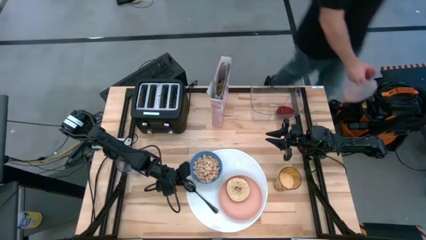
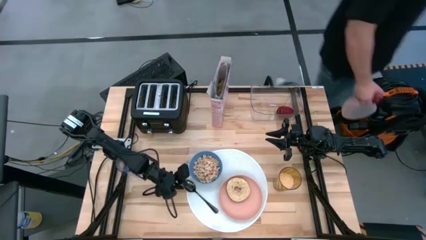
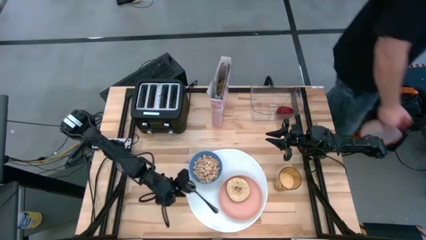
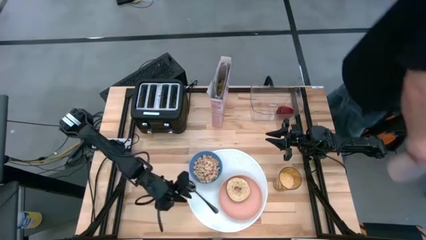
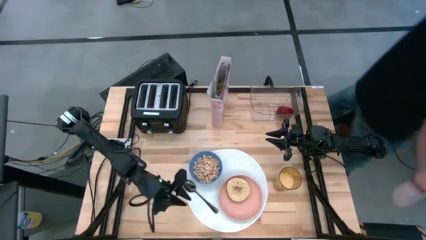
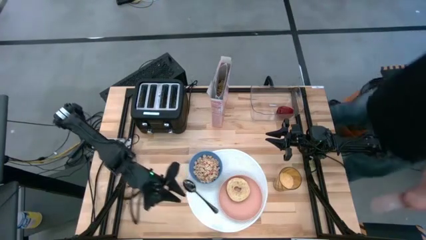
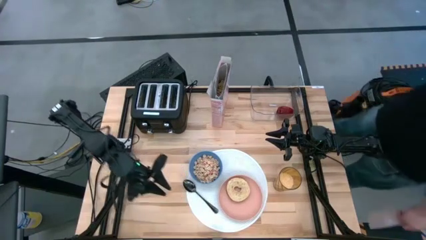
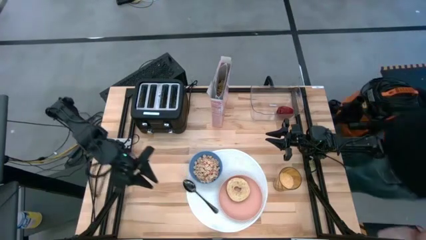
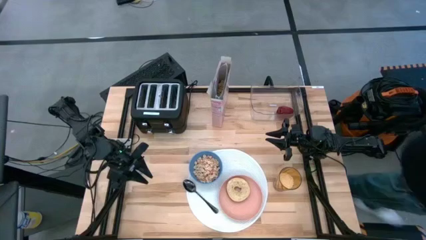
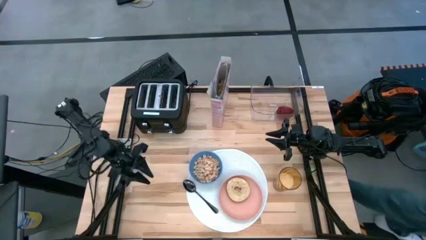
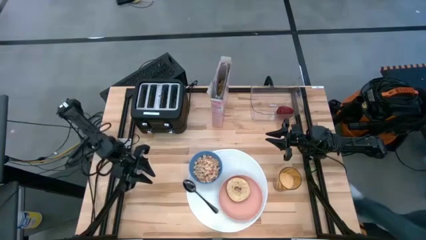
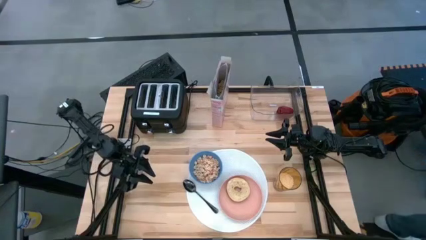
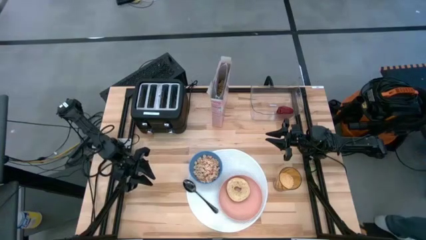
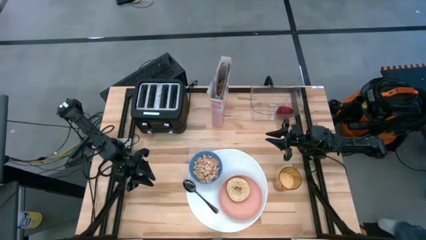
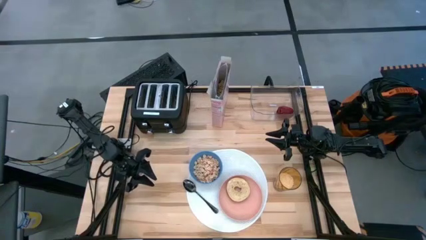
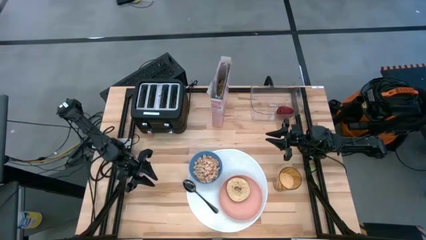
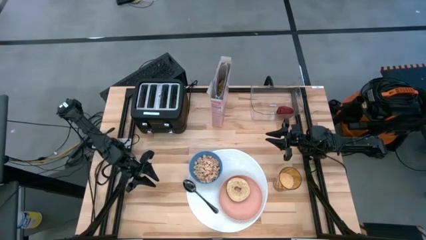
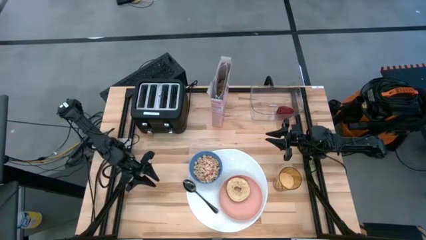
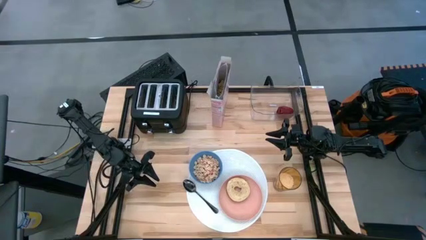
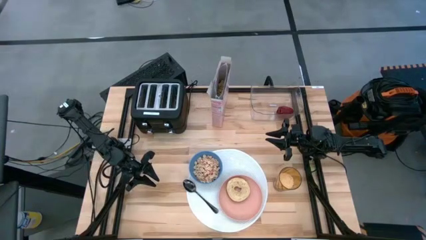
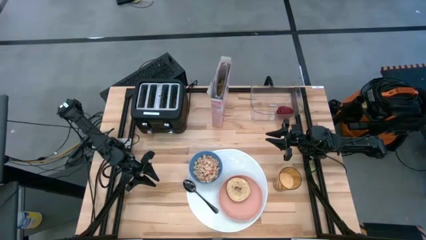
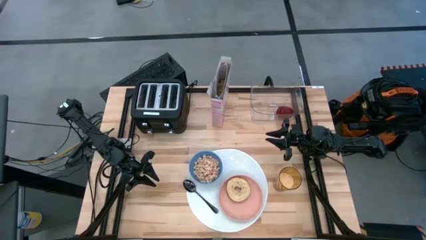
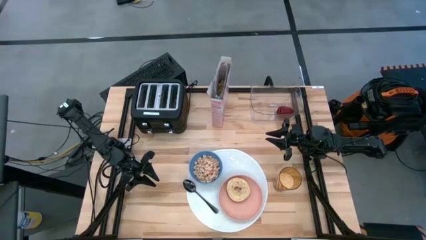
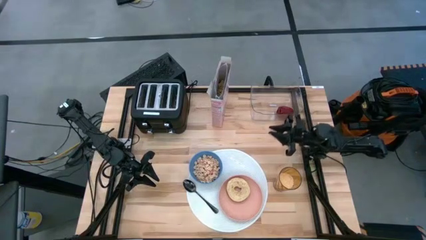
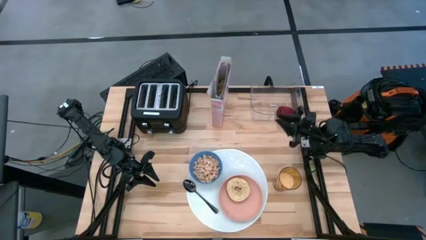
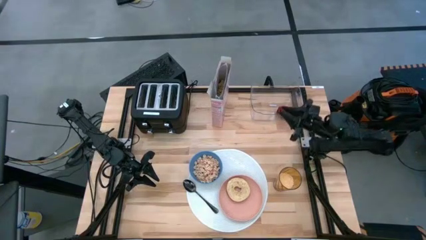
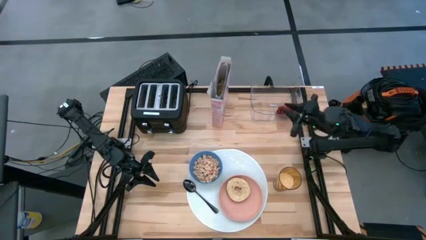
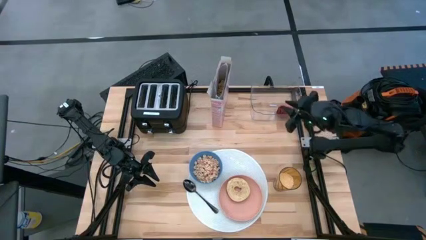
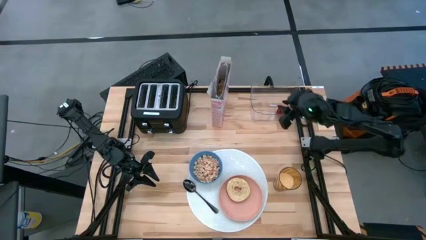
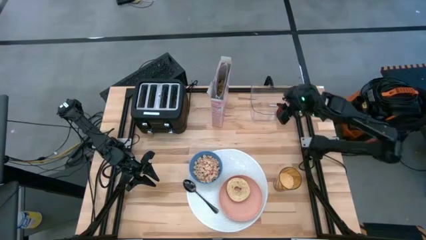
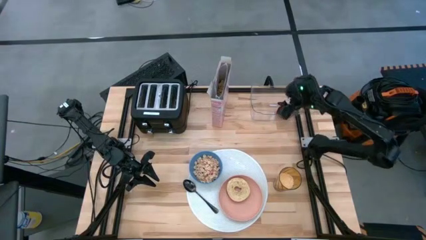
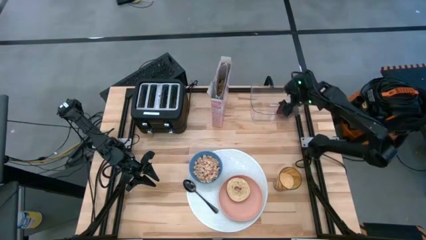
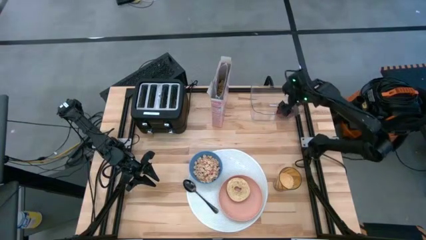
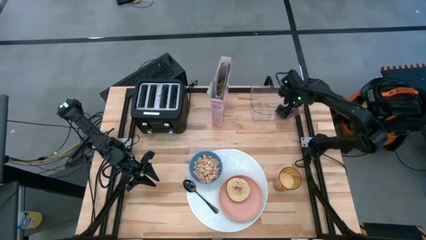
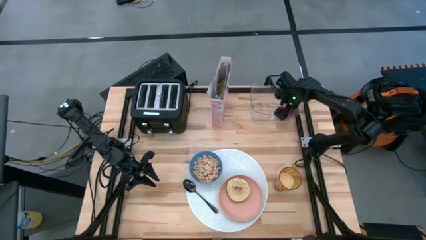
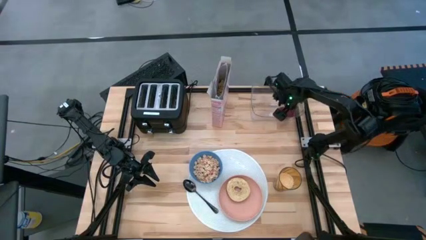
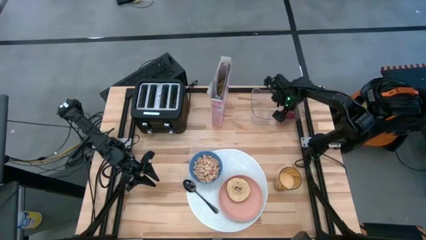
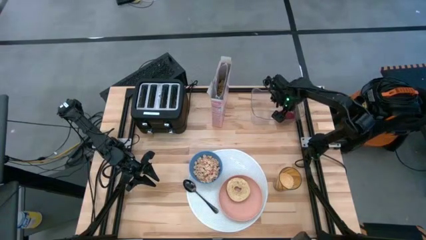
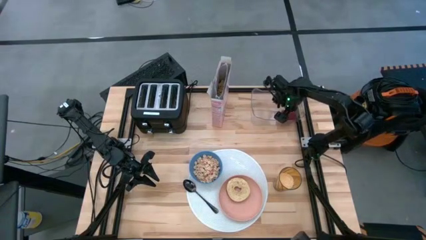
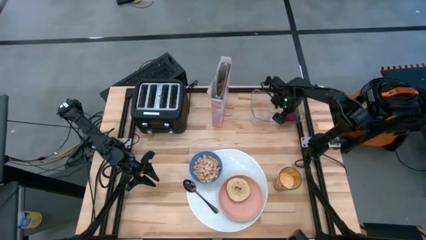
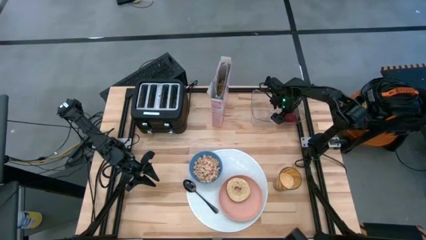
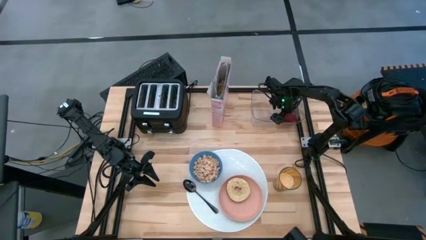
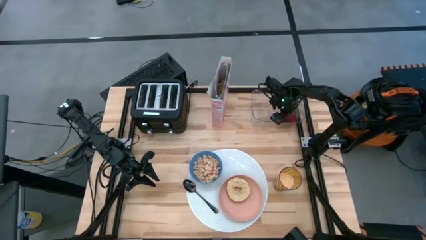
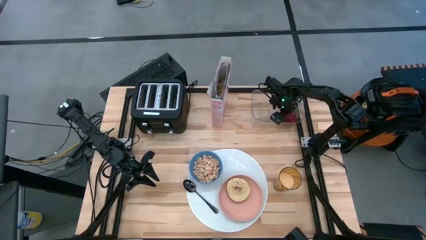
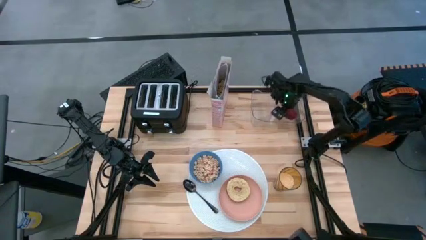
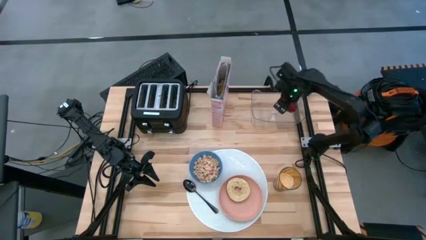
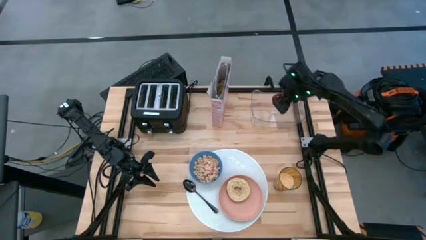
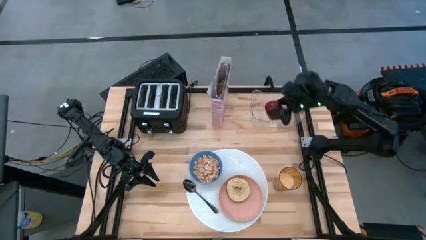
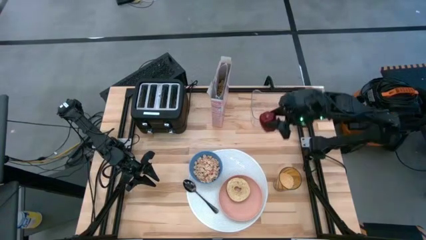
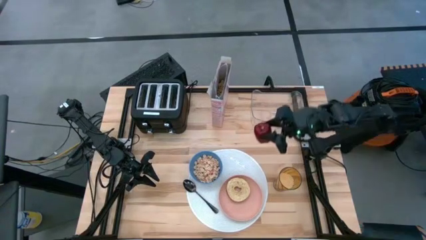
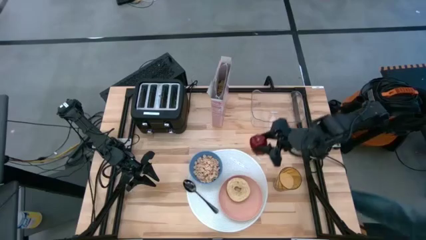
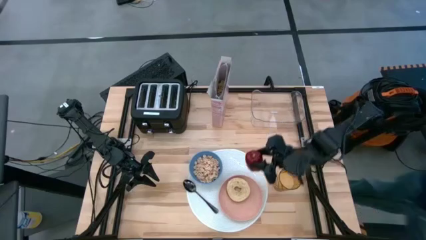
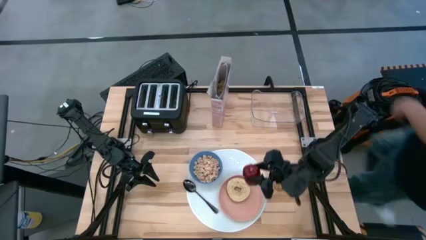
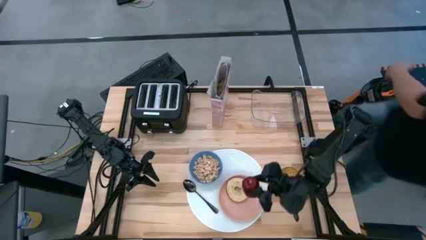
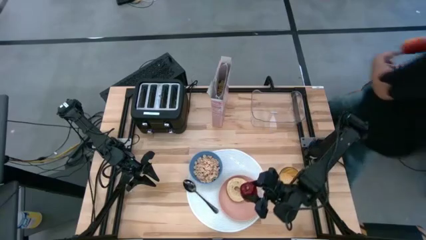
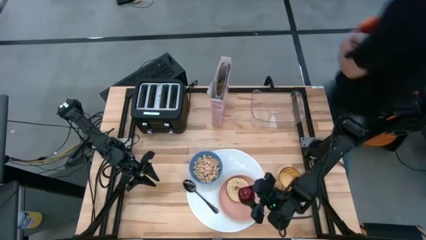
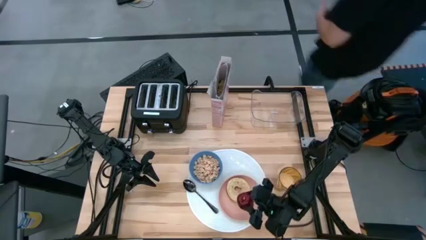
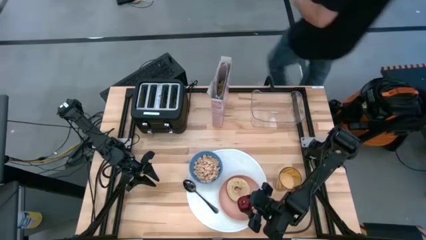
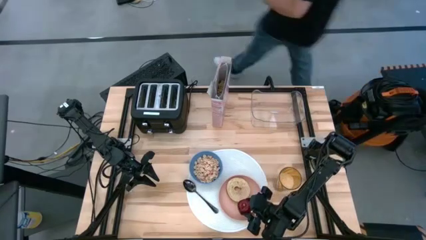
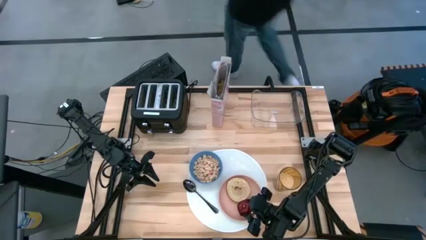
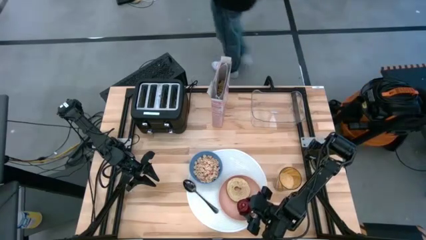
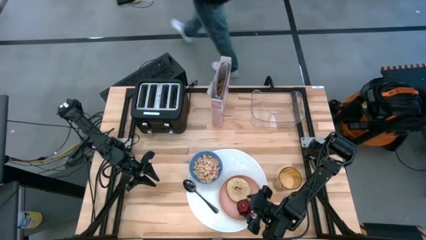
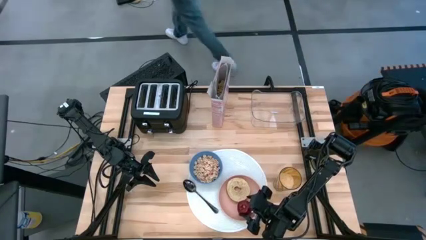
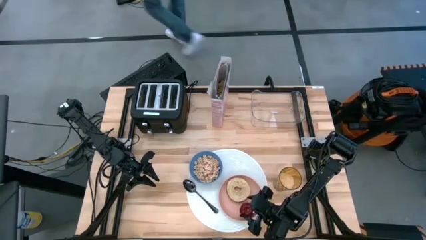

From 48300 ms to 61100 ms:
Task: Arrange a breakfast setting
Put the red apple from the transparent bin on the pink plate
